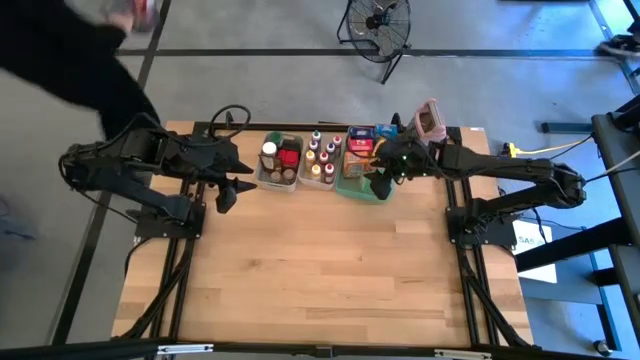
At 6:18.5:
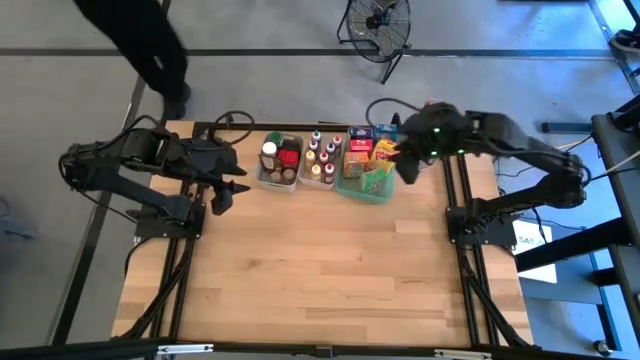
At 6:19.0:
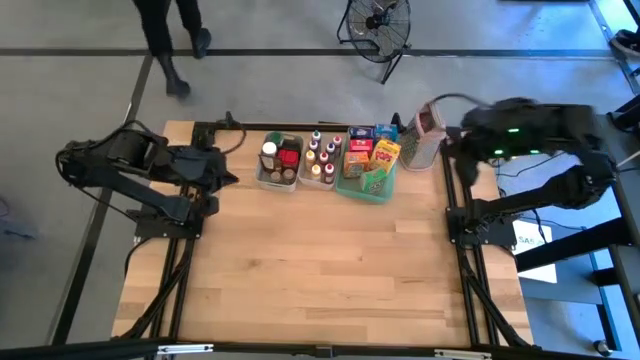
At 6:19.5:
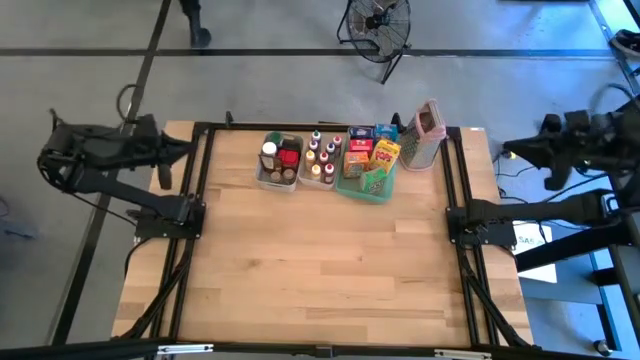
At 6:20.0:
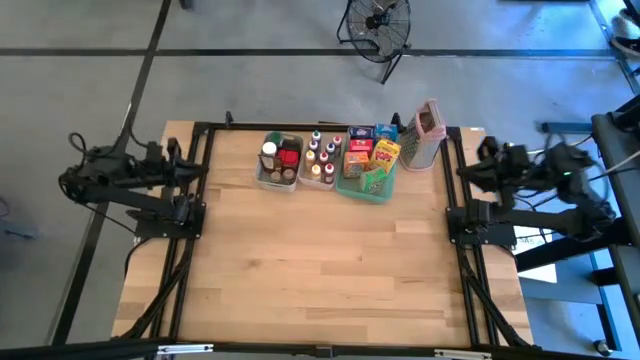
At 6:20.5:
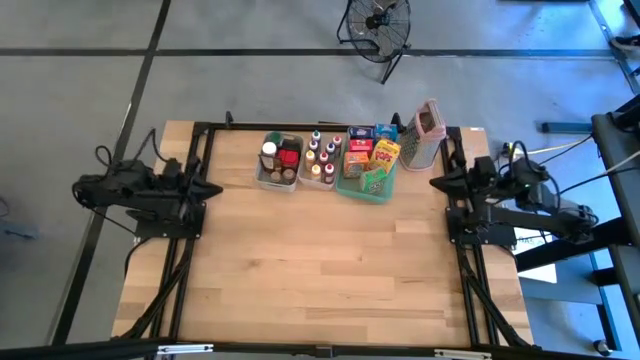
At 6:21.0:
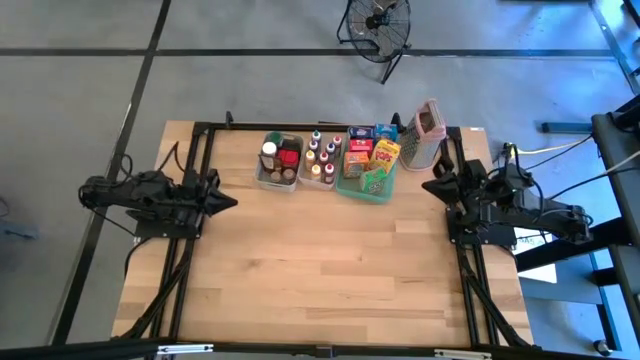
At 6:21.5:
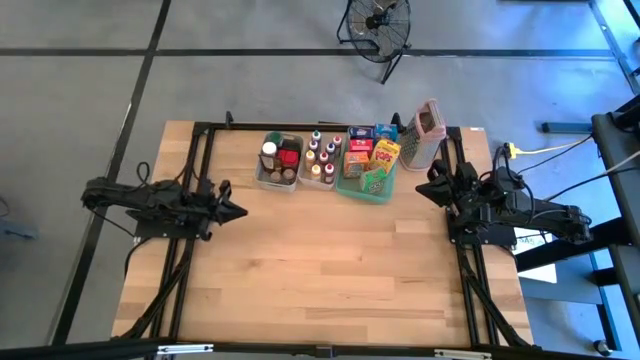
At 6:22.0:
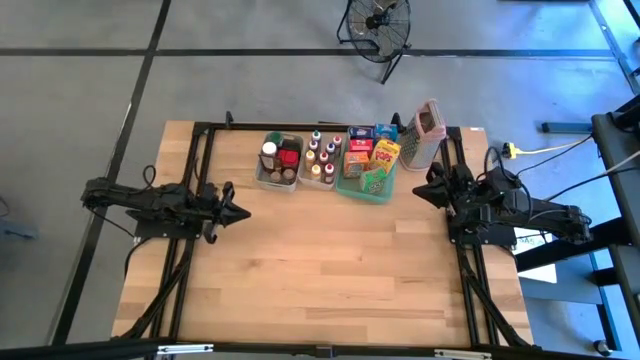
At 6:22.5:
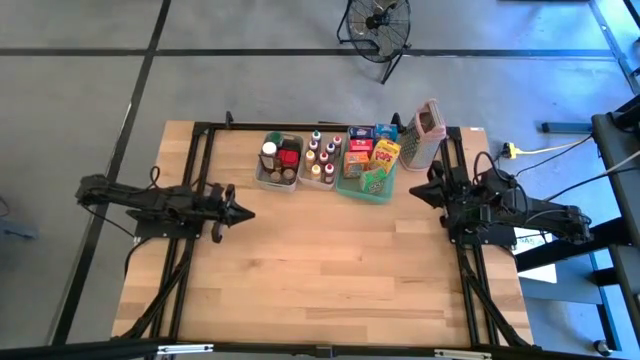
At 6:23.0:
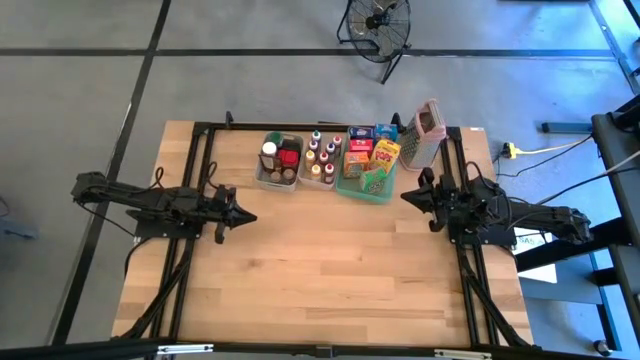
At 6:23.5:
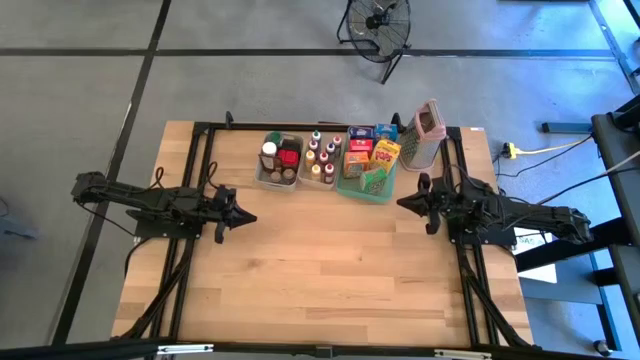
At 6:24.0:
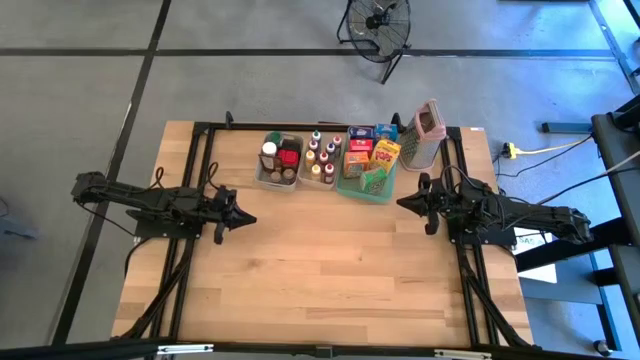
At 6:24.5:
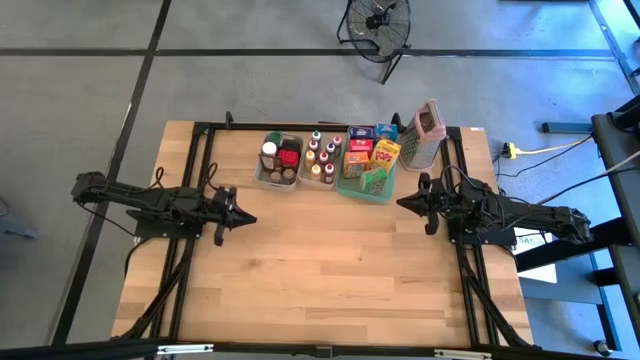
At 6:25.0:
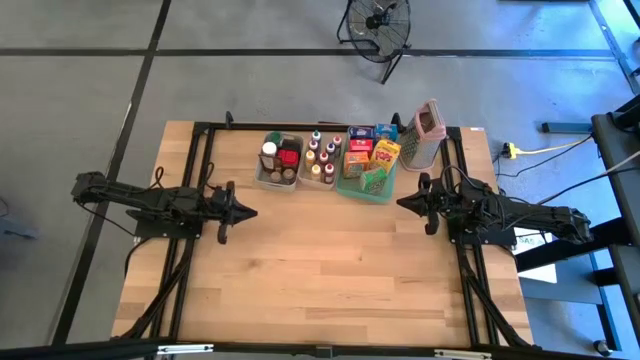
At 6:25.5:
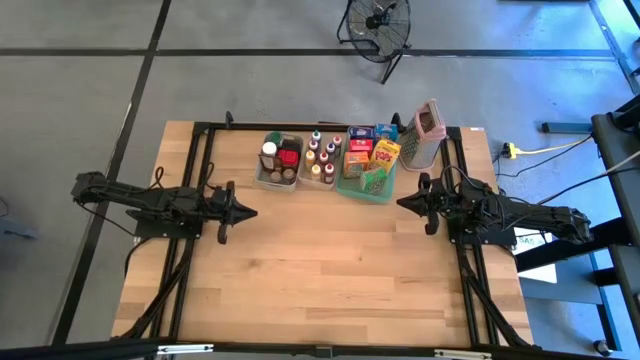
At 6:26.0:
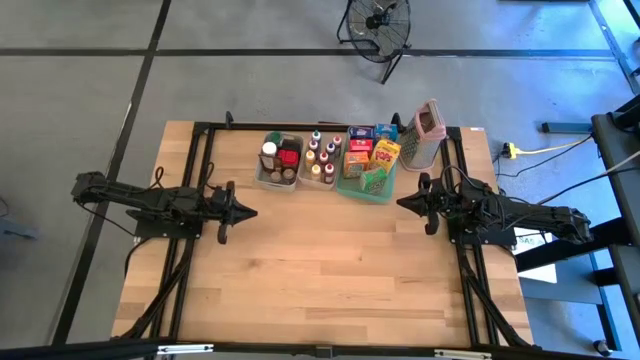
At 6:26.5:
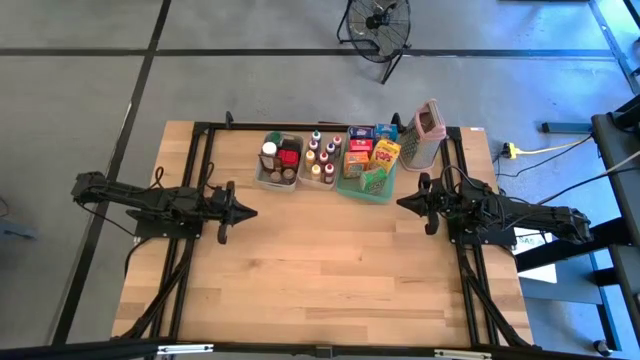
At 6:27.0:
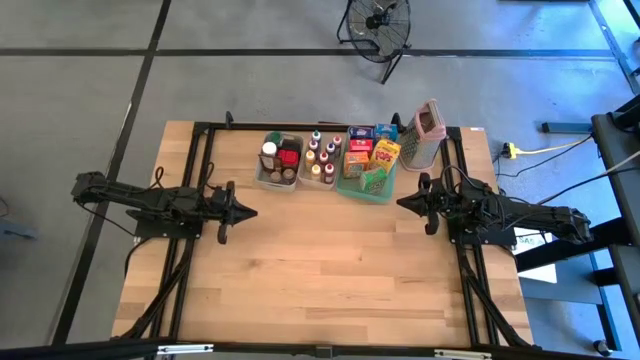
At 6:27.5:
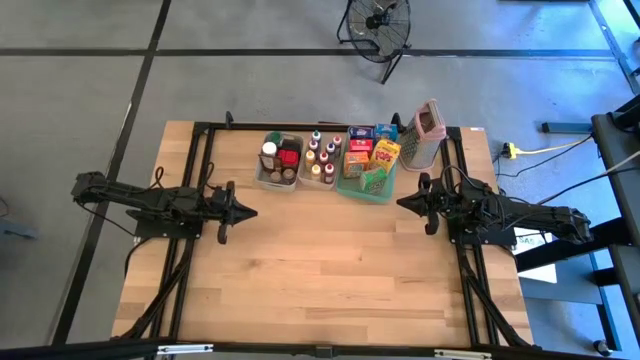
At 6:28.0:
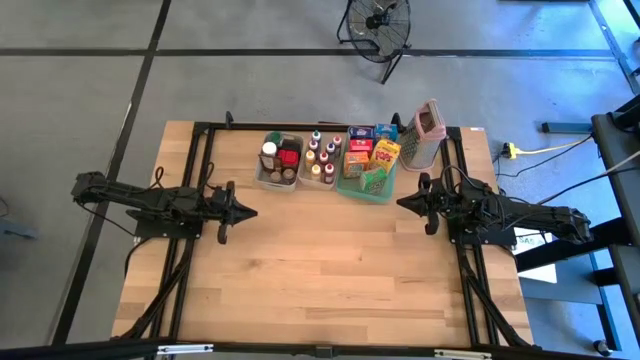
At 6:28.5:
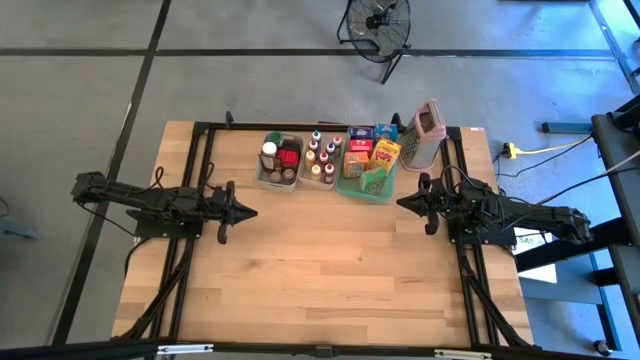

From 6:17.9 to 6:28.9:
Task: Pick & Place Kitchen Items
Return to Home Position

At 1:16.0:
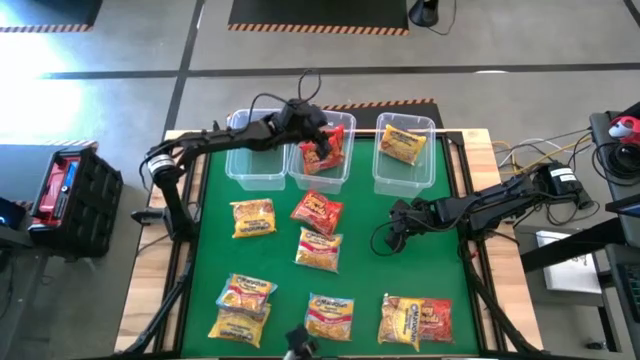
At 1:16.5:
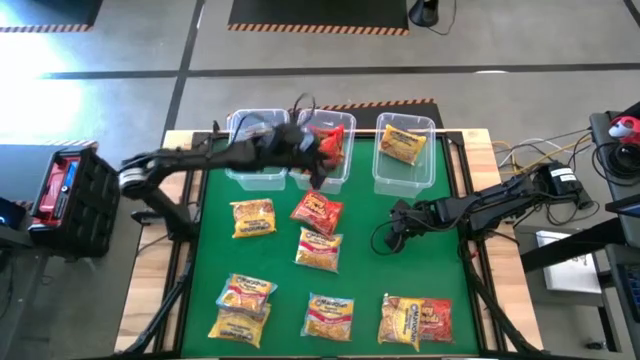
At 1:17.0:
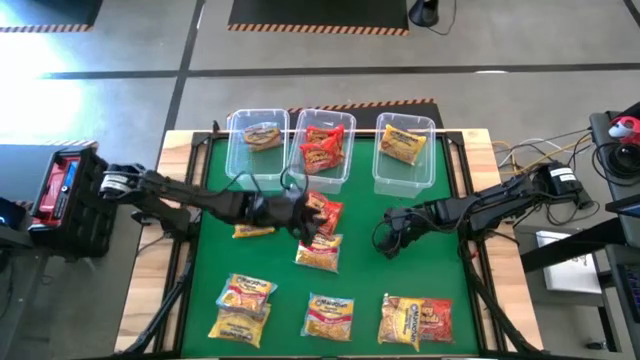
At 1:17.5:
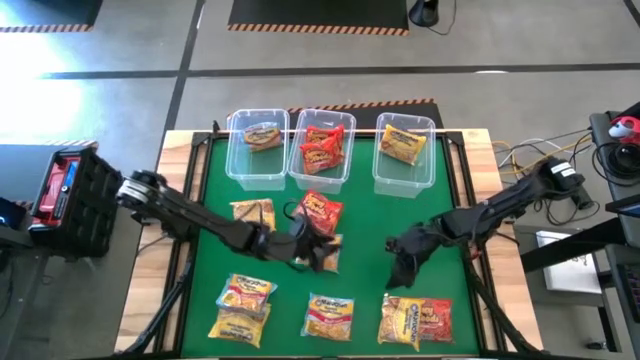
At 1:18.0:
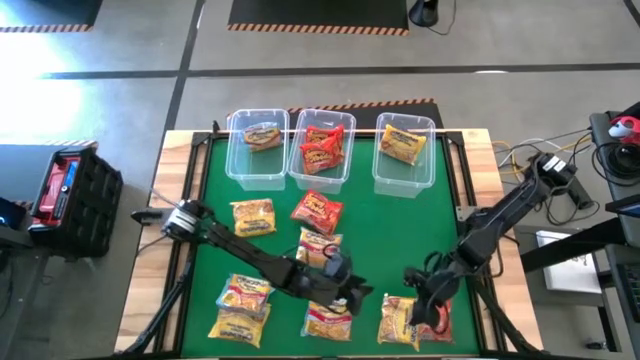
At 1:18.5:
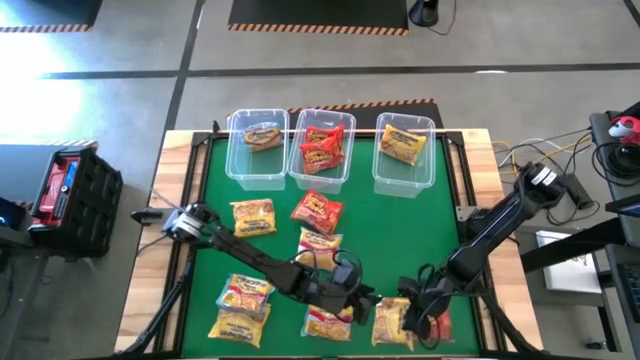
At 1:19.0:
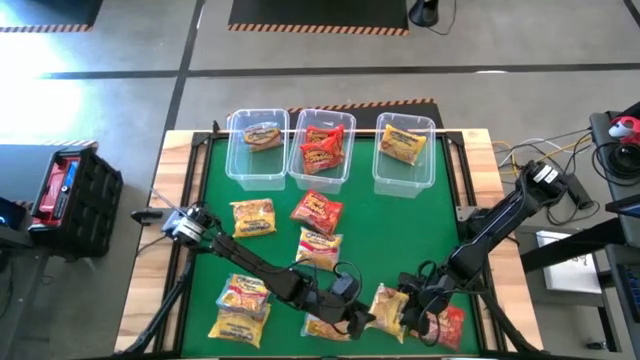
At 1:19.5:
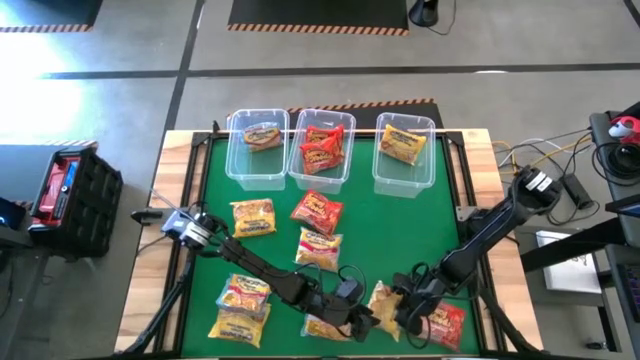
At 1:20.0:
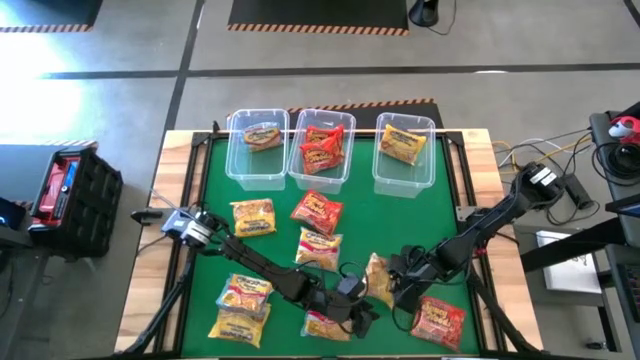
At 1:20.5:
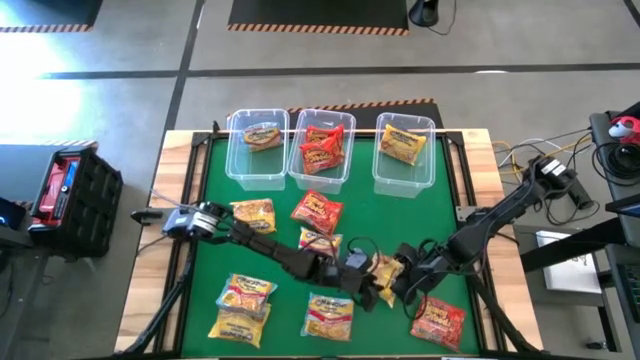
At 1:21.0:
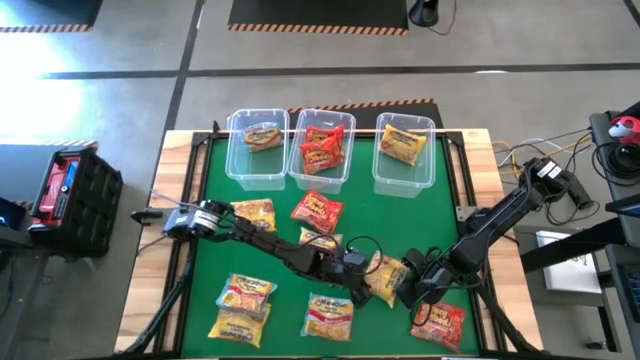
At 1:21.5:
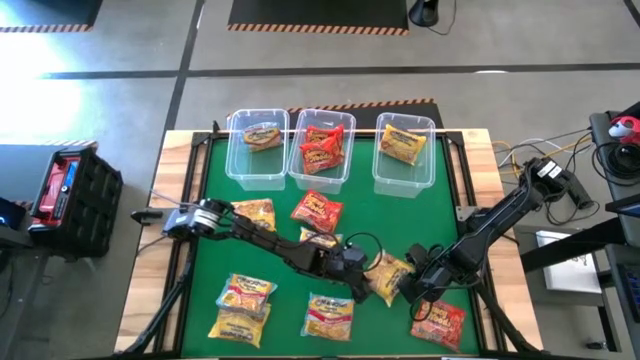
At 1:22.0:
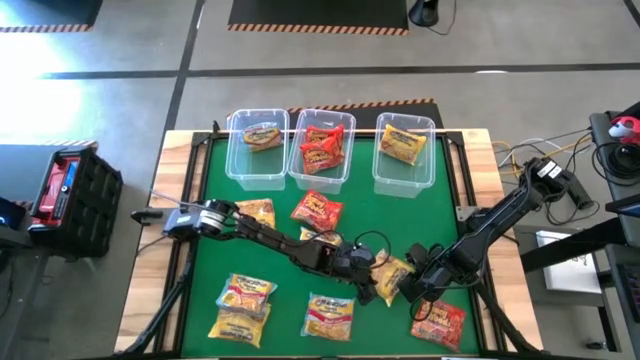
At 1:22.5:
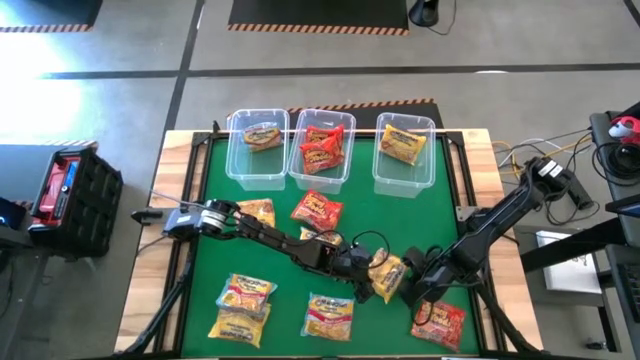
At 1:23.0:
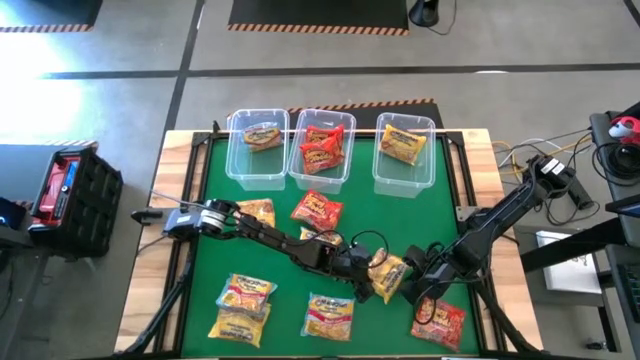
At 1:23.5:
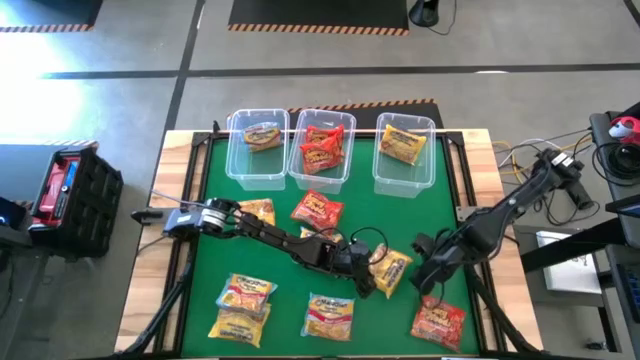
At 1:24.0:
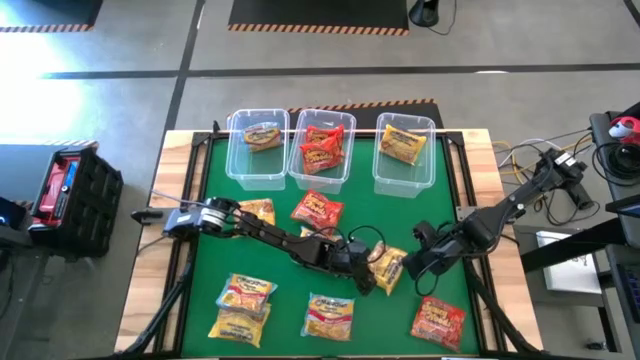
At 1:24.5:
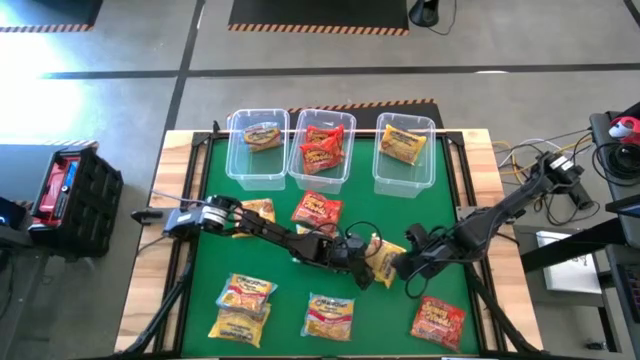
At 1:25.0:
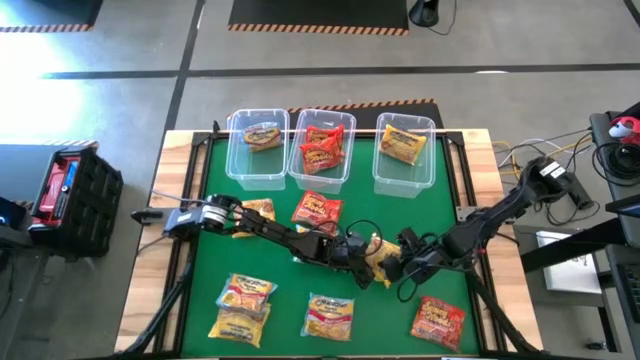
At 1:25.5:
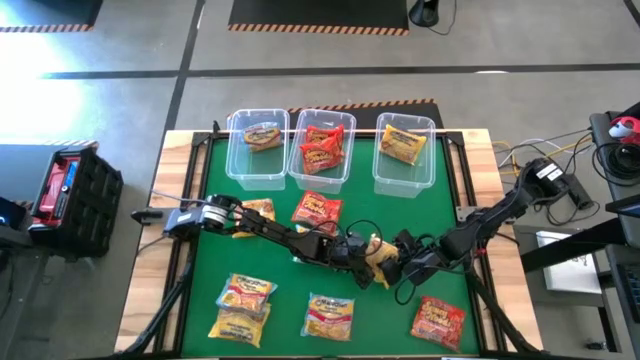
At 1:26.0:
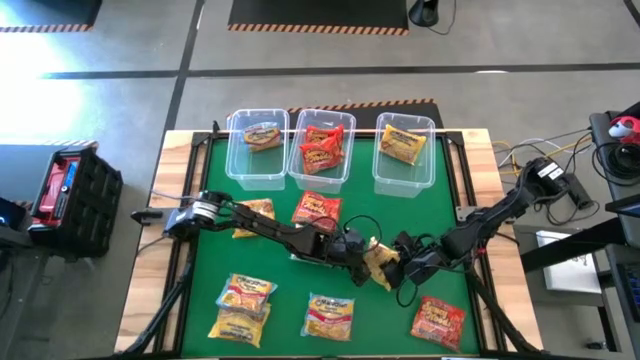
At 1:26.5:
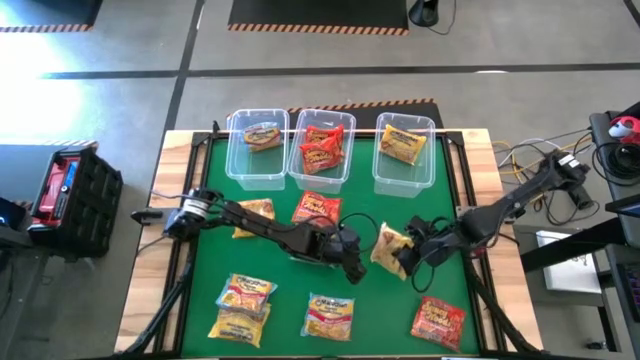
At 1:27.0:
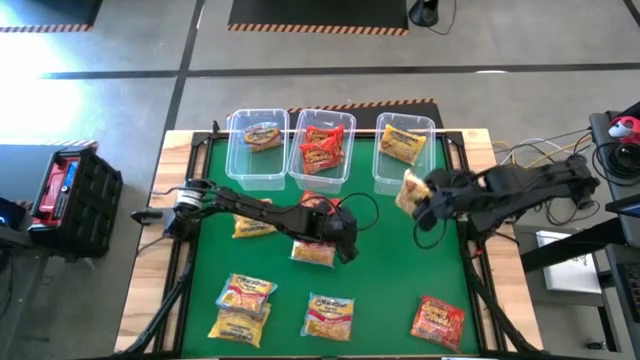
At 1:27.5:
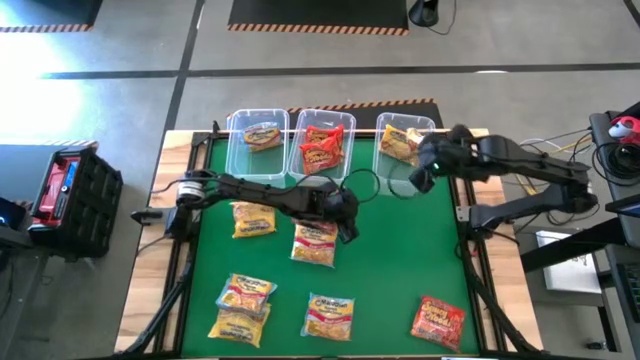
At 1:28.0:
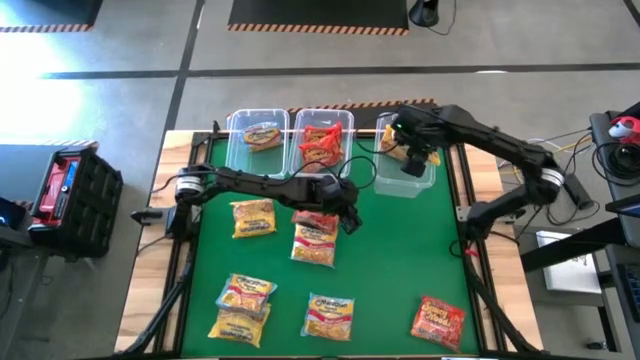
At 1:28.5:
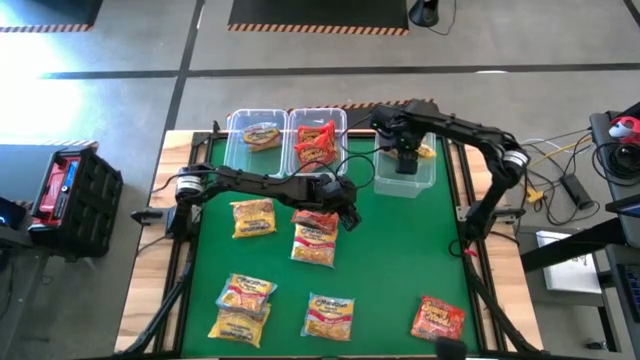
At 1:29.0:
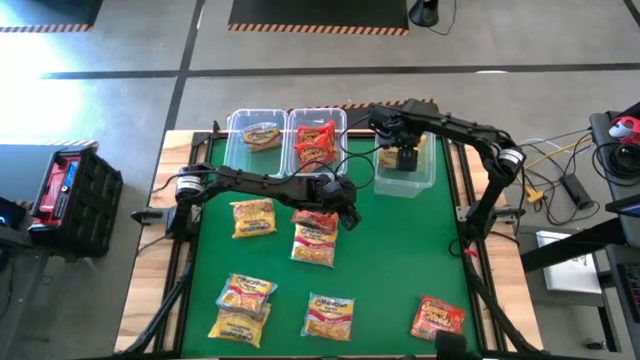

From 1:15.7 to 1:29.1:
Task: Sort Maruchan noodles
Put the bottom right yellow noodle pack into the top right transparent bin
